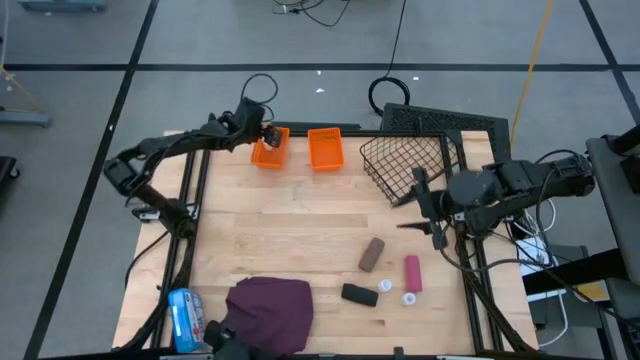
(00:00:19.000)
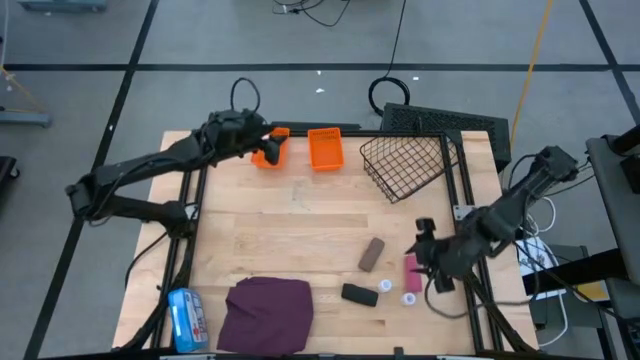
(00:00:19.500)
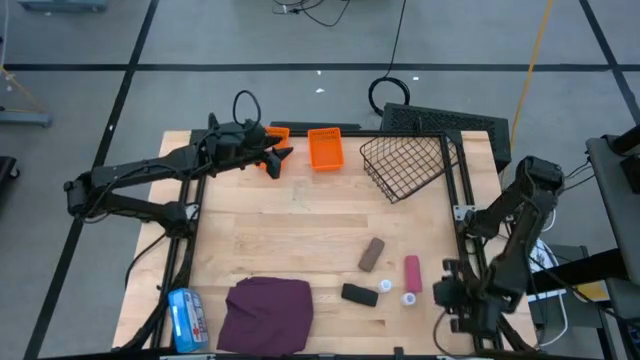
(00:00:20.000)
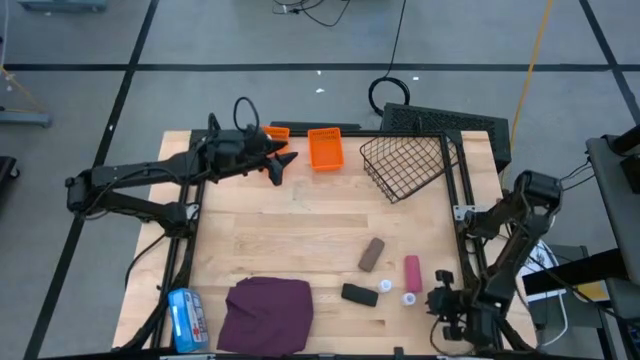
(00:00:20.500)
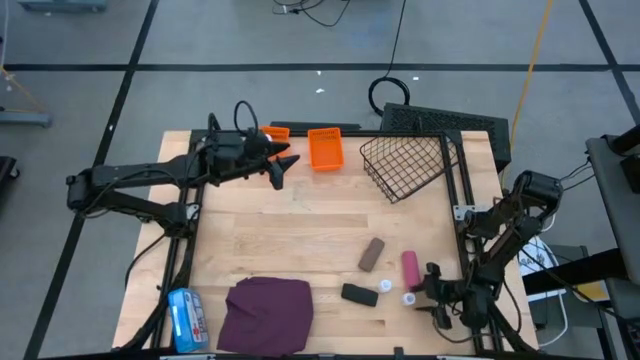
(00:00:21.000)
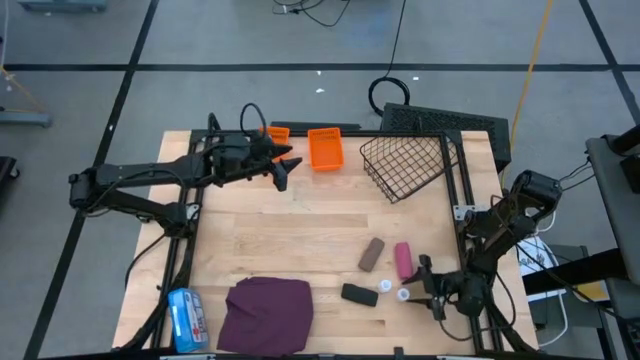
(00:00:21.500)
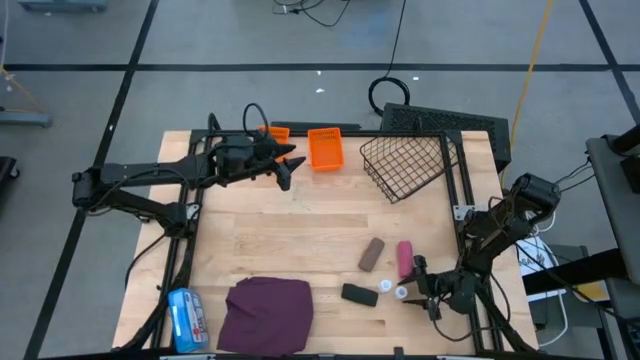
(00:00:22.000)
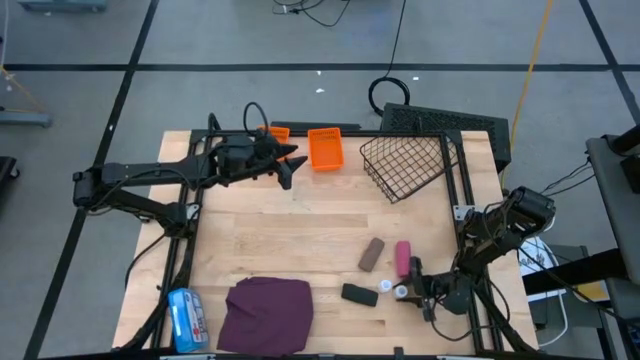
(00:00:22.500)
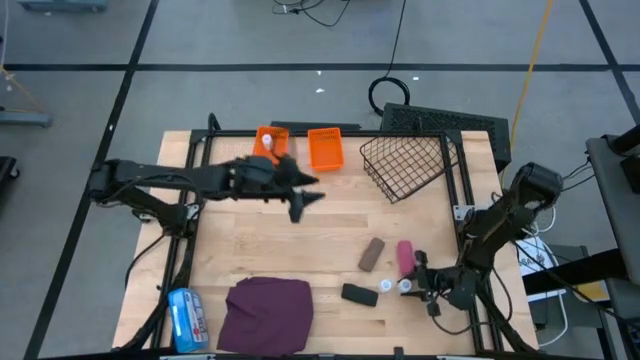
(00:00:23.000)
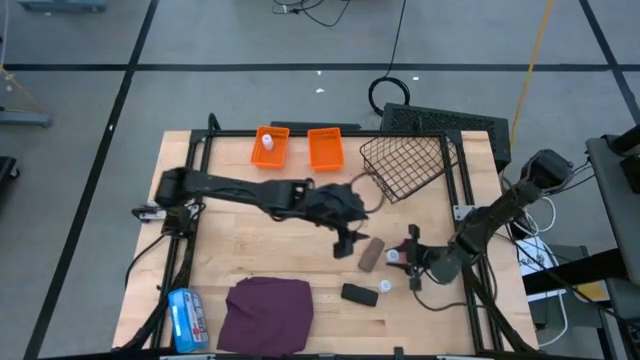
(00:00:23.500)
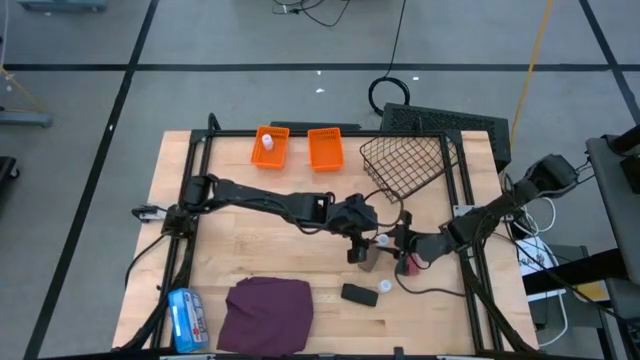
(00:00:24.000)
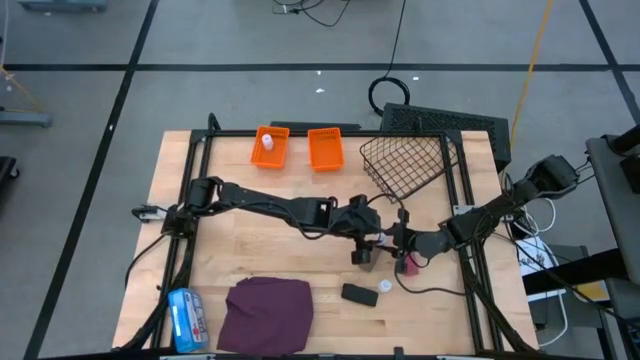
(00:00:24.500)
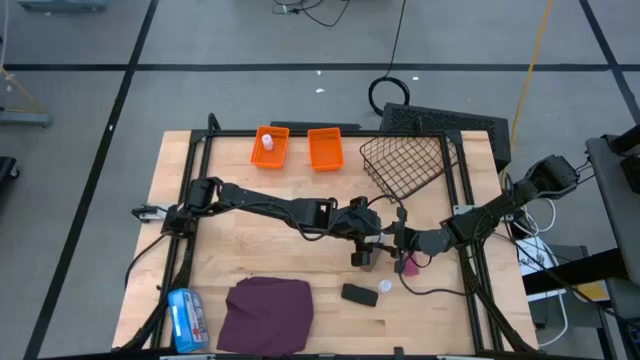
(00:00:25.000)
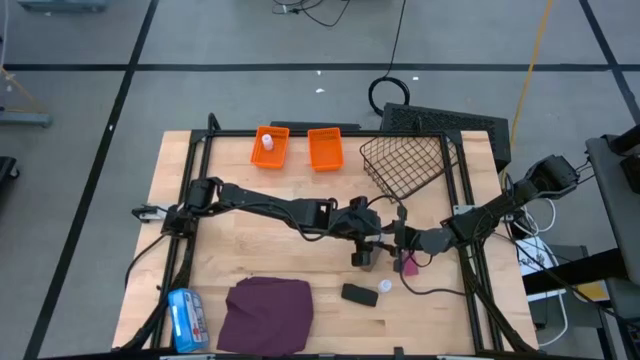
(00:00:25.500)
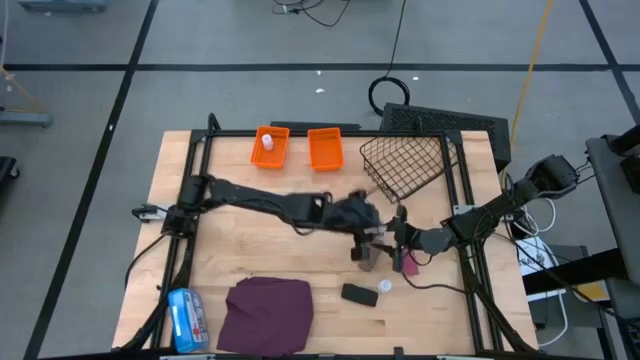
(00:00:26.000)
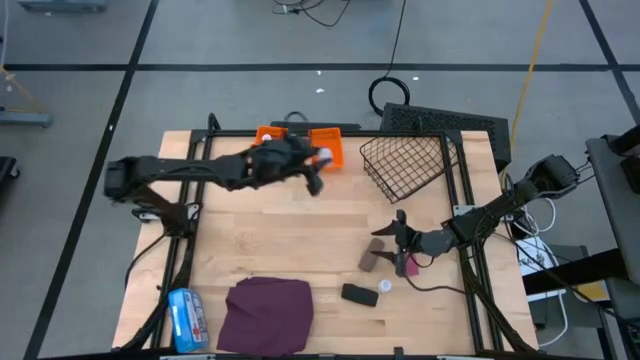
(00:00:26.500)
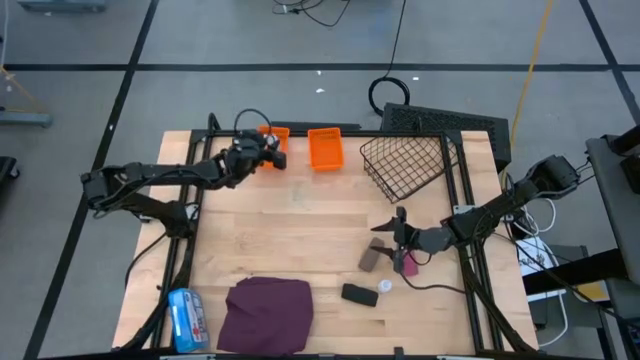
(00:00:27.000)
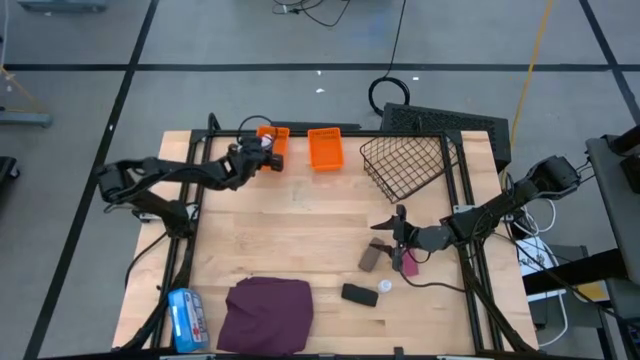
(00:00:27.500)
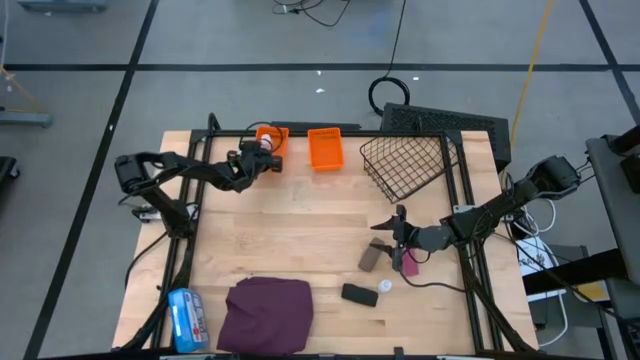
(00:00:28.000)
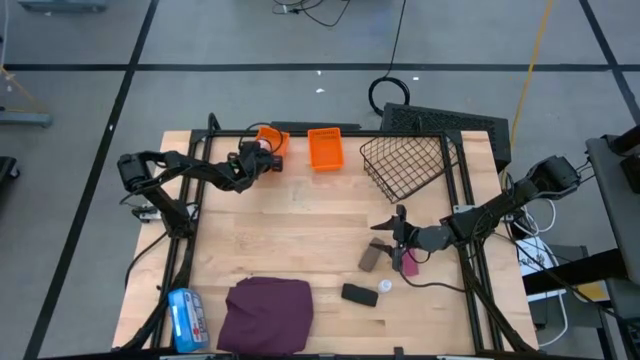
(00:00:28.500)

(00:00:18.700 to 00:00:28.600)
Task: Pick & Place Medicine items
Put the bottom transparent pill bottle into the left orange bin

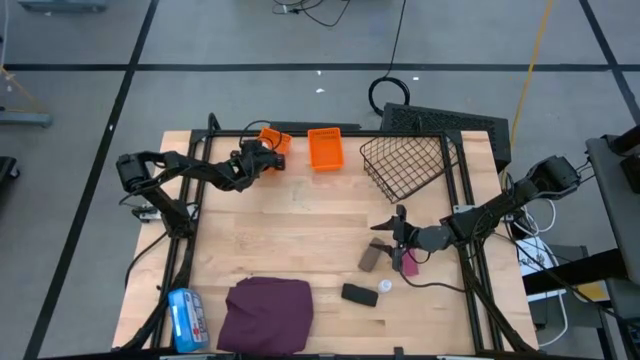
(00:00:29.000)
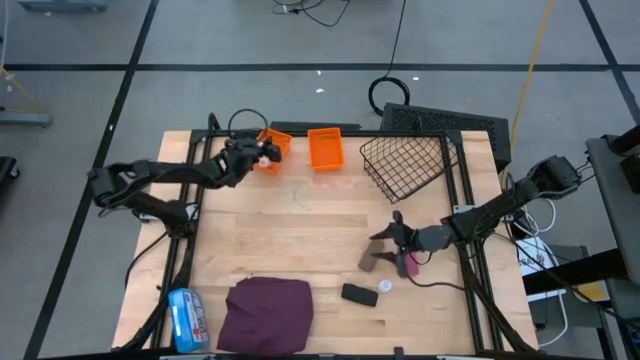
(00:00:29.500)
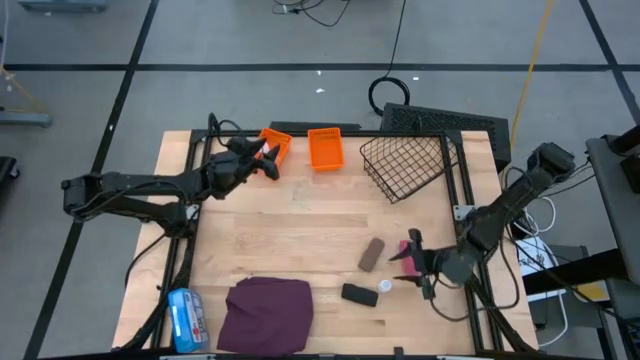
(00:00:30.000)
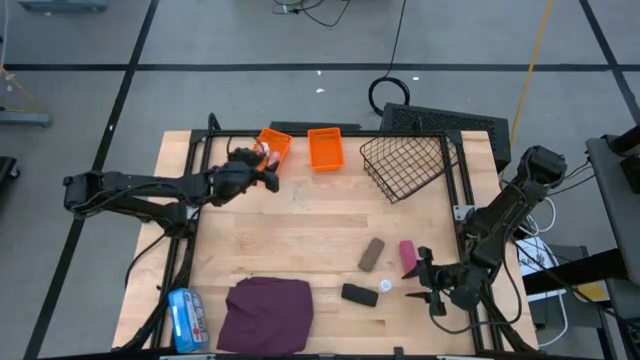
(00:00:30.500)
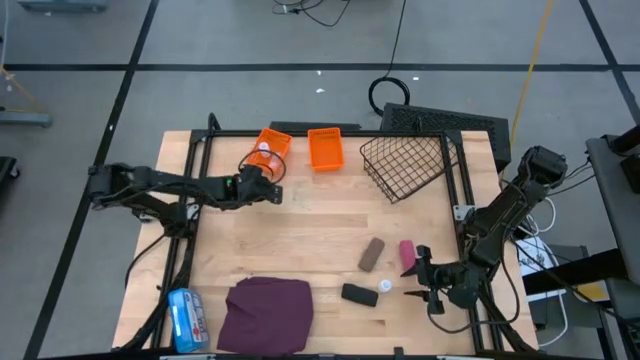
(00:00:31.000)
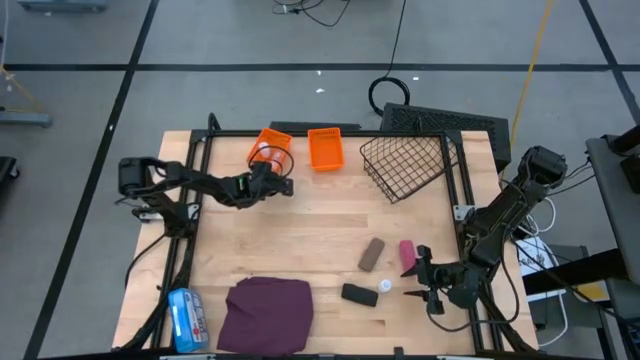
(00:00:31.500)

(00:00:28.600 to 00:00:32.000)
Adjust the left orange bin

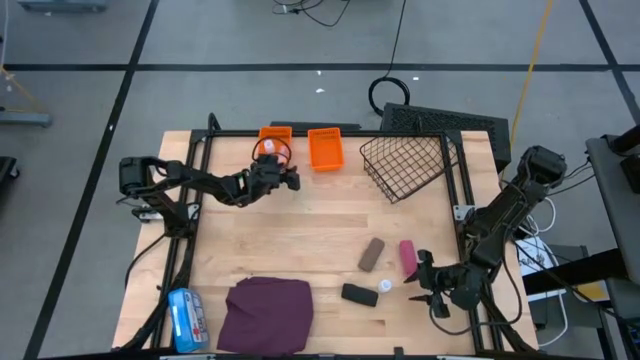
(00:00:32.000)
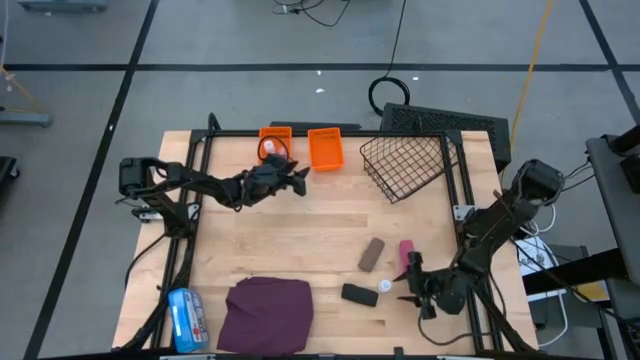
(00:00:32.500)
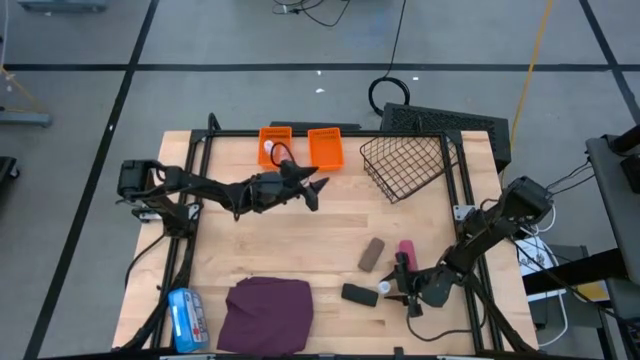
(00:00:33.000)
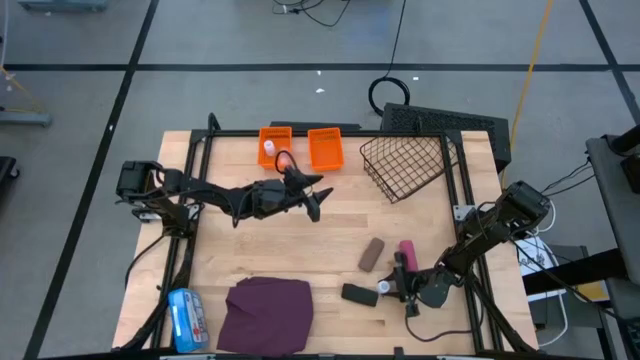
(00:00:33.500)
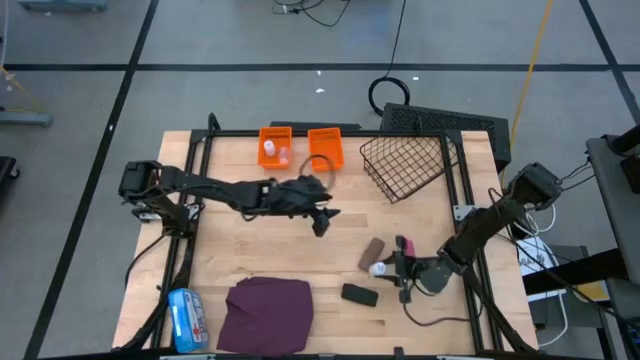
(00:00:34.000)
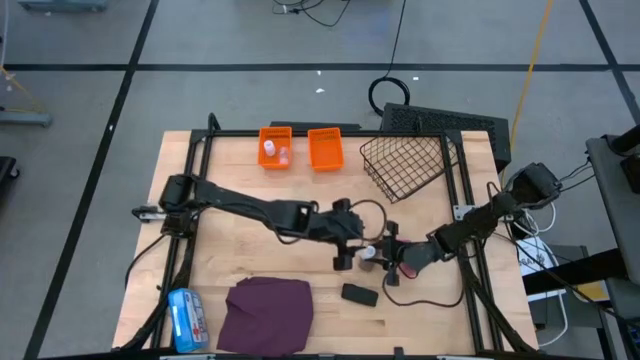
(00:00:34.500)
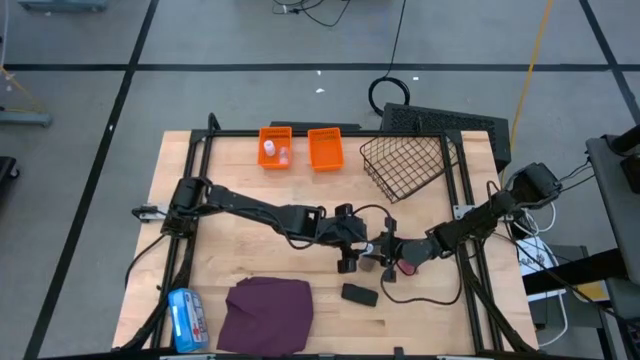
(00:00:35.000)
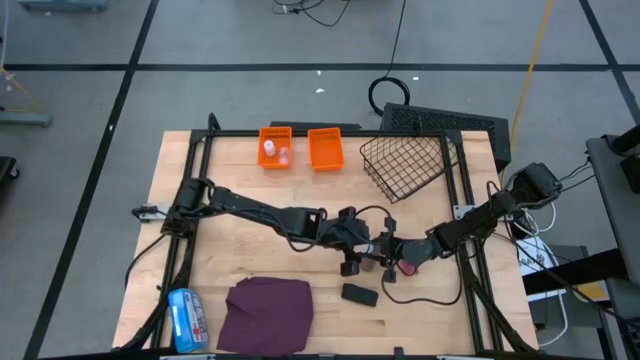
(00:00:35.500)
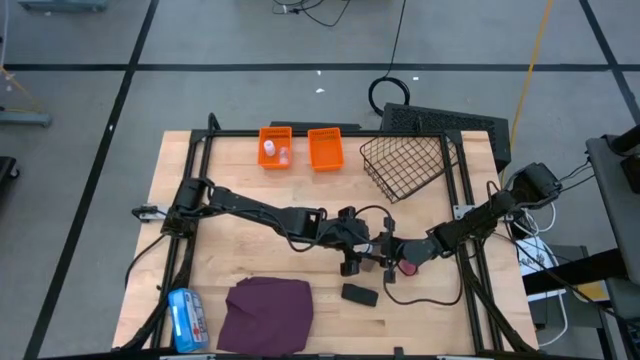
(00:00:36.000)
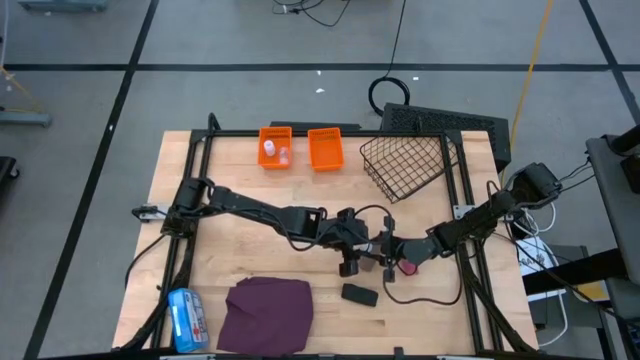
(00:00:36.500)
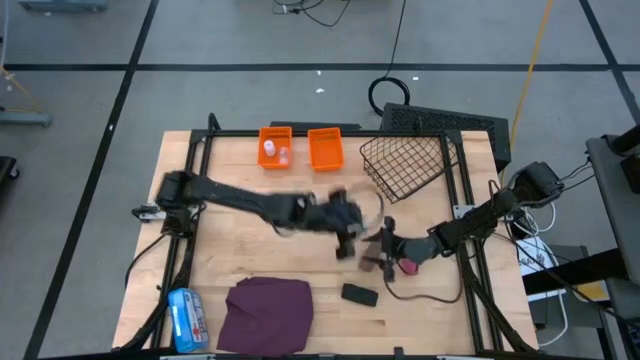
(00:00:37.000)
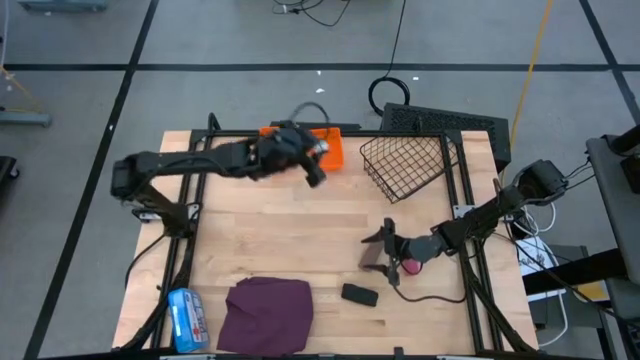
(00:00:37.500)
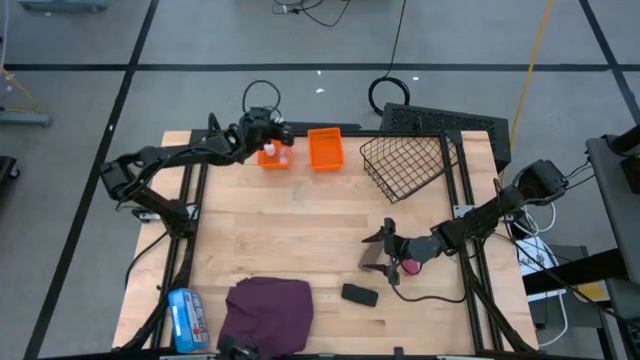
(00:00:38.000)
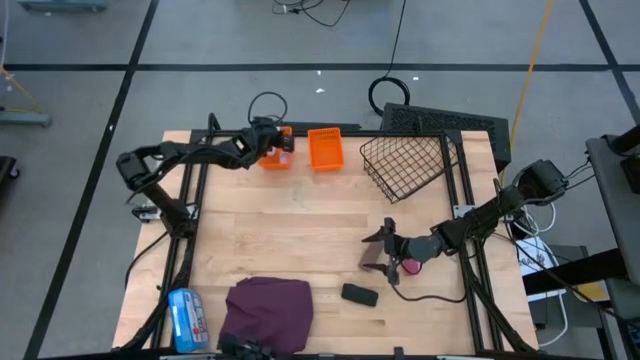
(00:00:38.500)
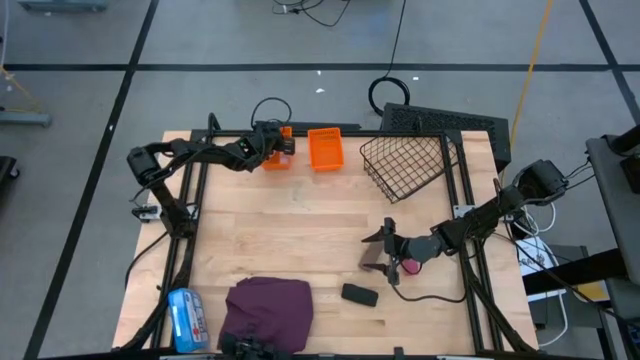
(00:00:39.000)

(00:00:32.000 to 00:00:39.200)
Put the transparent pill bottle into the left orange bin
